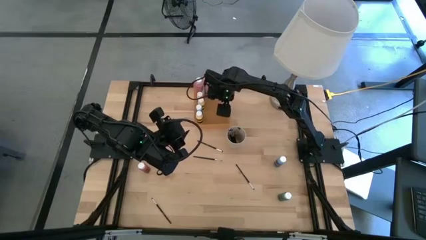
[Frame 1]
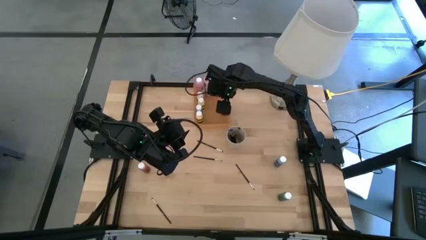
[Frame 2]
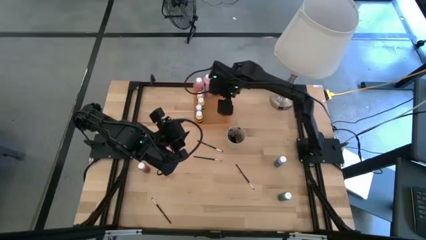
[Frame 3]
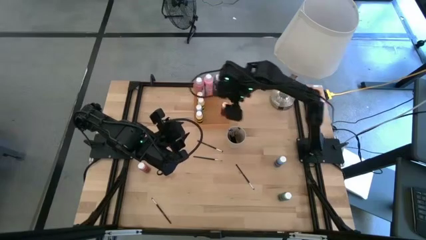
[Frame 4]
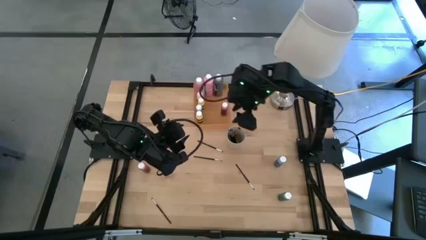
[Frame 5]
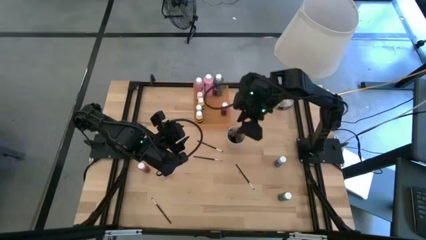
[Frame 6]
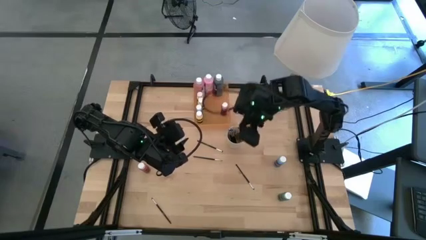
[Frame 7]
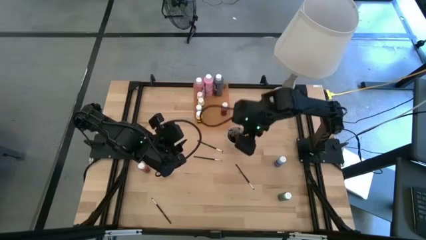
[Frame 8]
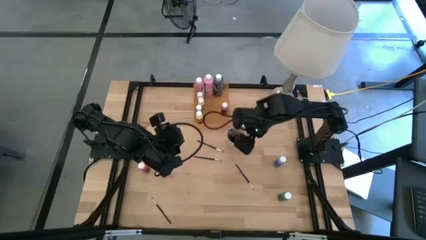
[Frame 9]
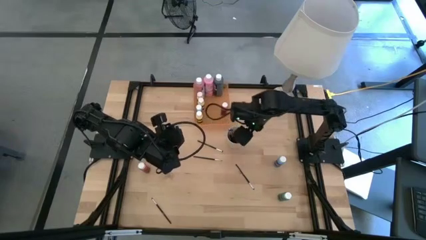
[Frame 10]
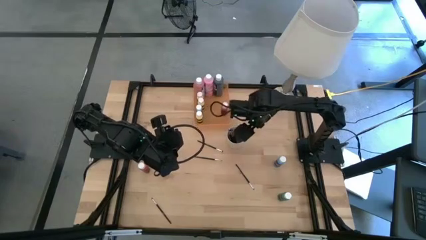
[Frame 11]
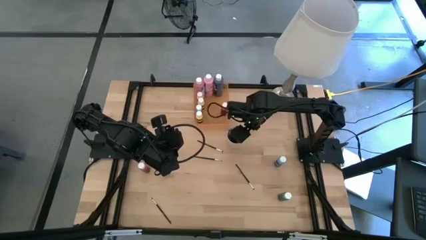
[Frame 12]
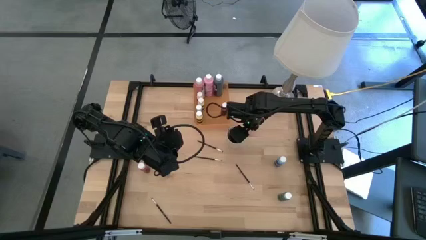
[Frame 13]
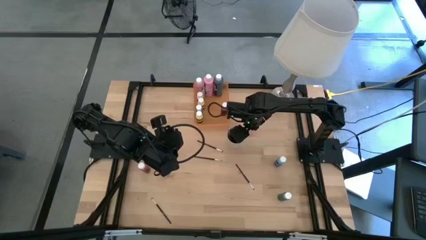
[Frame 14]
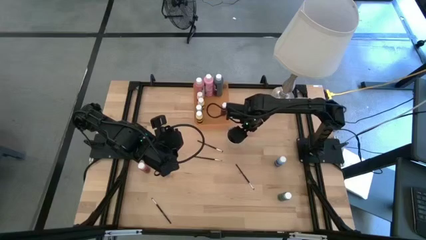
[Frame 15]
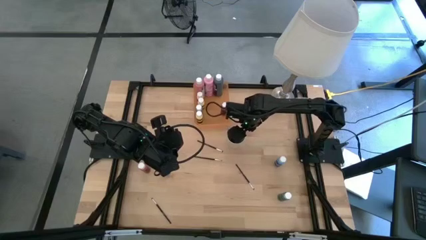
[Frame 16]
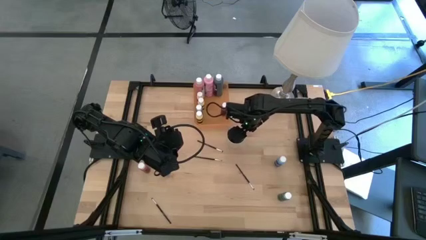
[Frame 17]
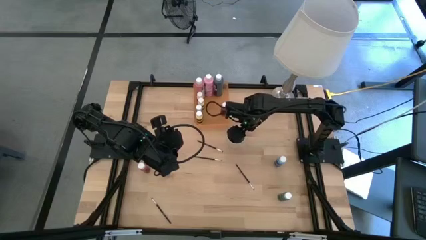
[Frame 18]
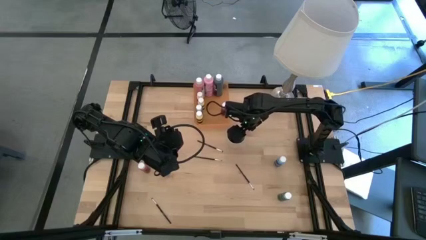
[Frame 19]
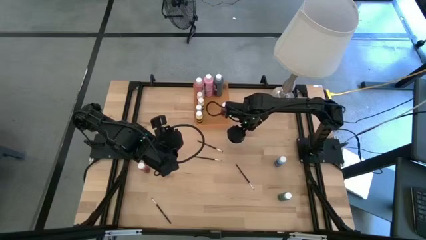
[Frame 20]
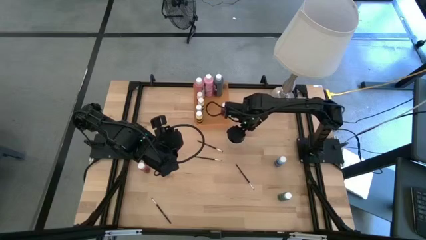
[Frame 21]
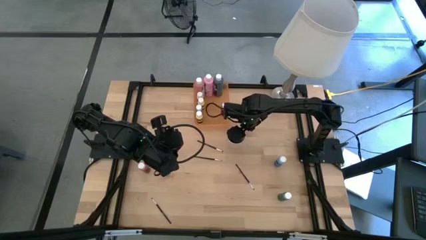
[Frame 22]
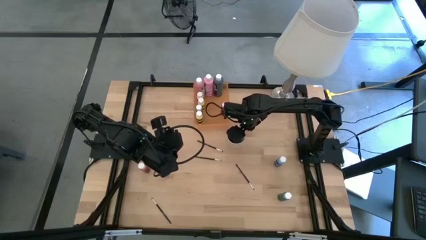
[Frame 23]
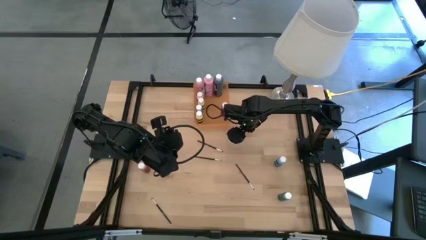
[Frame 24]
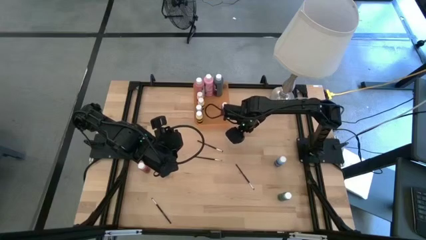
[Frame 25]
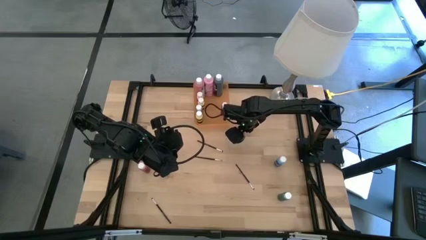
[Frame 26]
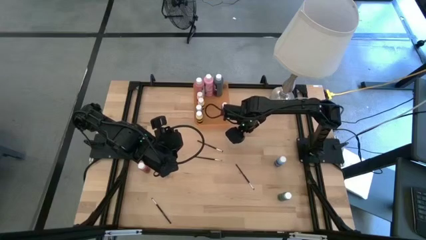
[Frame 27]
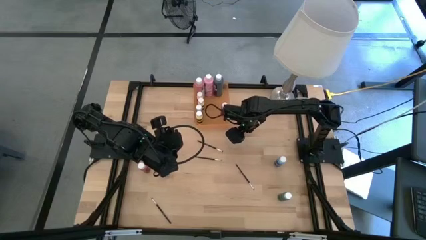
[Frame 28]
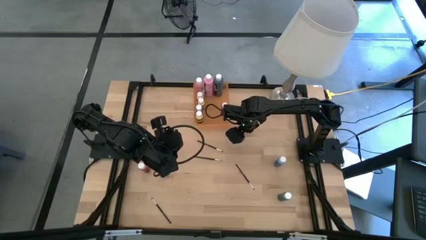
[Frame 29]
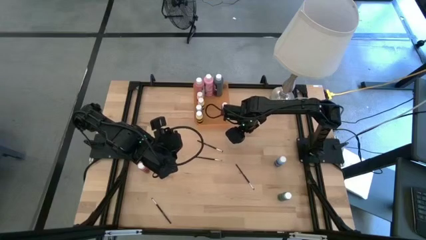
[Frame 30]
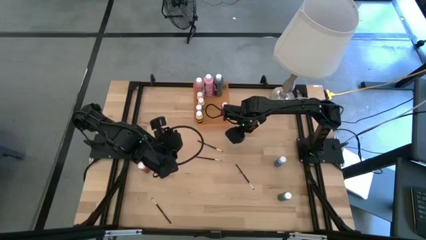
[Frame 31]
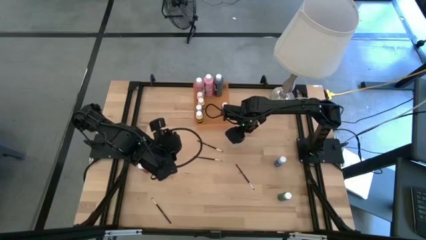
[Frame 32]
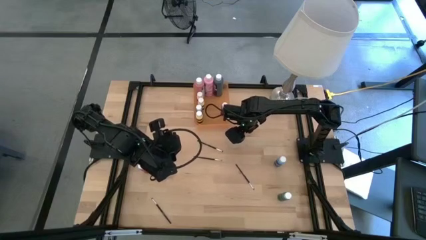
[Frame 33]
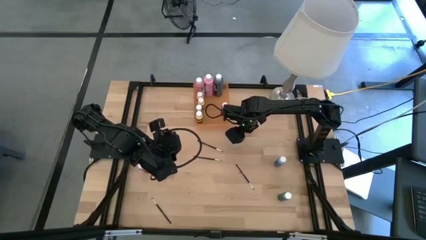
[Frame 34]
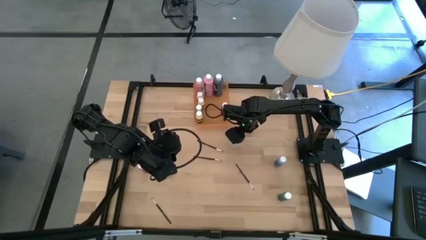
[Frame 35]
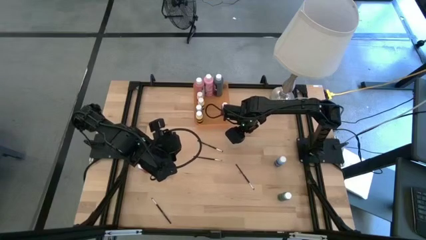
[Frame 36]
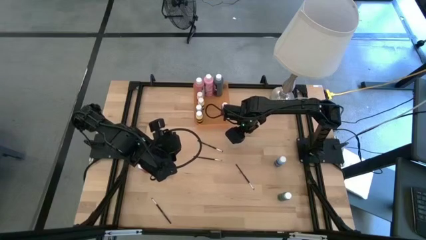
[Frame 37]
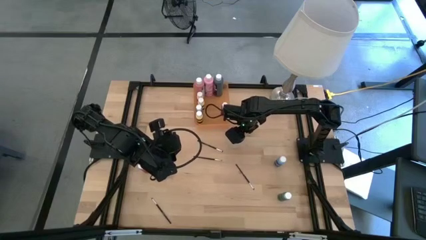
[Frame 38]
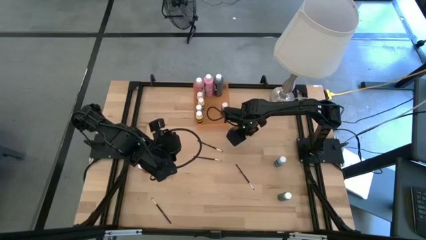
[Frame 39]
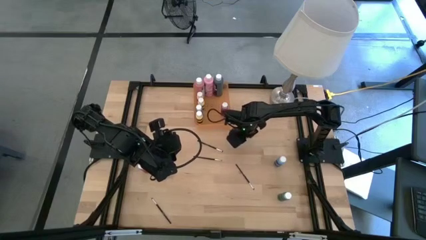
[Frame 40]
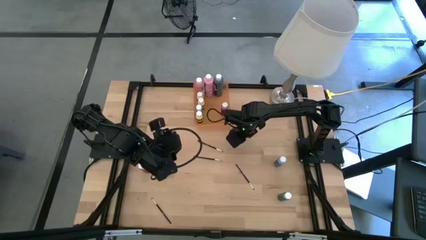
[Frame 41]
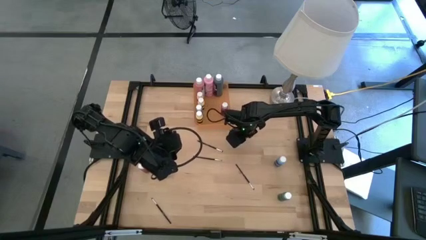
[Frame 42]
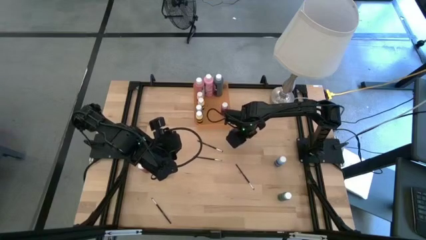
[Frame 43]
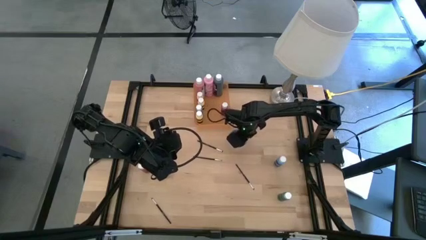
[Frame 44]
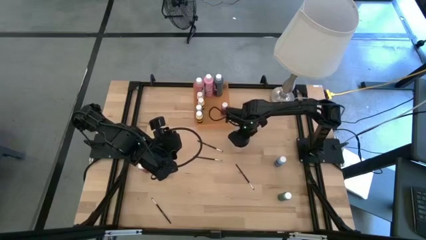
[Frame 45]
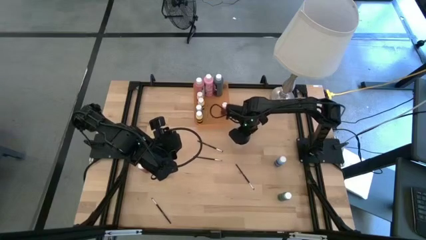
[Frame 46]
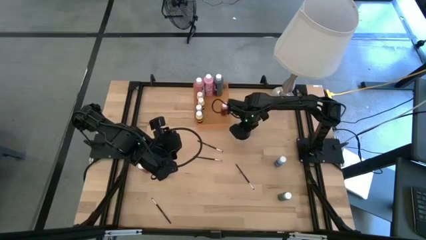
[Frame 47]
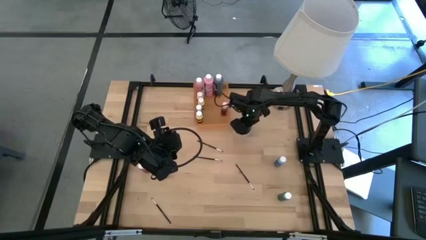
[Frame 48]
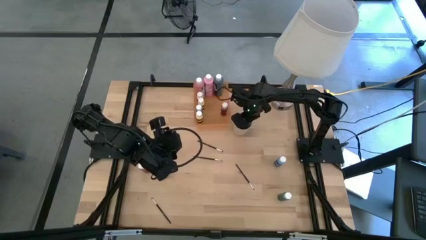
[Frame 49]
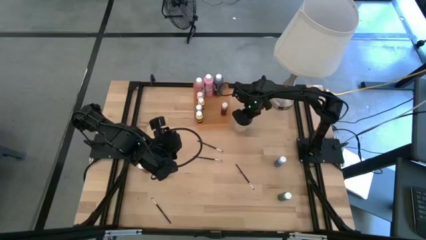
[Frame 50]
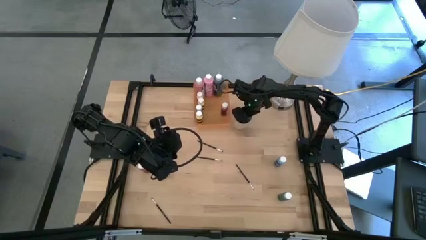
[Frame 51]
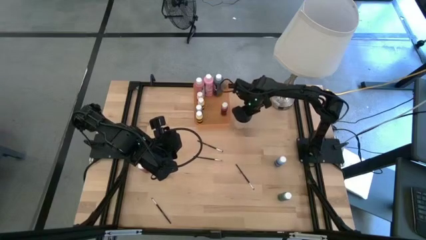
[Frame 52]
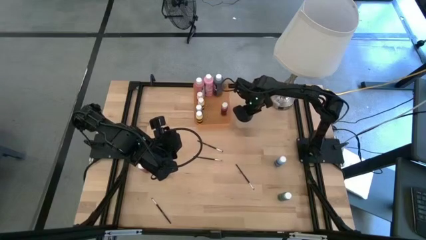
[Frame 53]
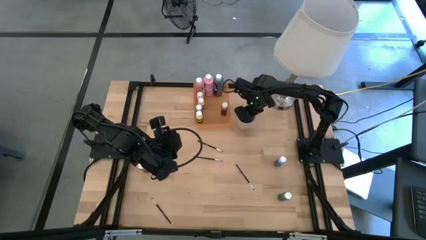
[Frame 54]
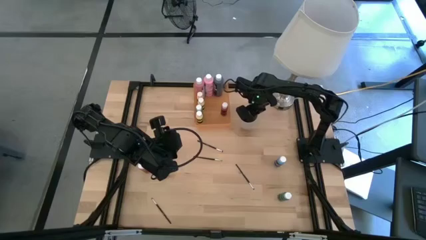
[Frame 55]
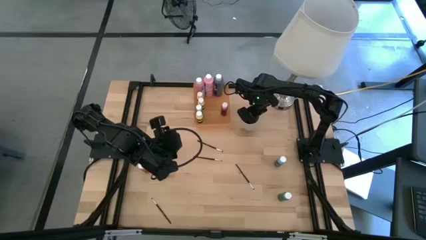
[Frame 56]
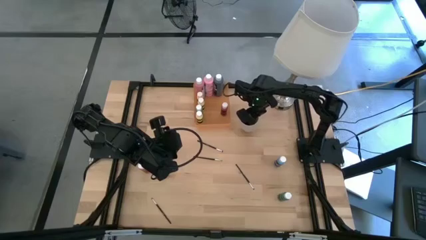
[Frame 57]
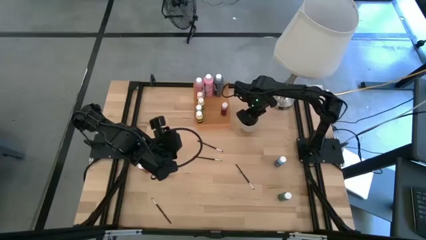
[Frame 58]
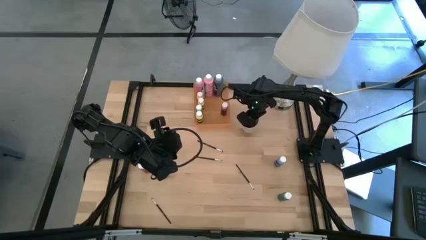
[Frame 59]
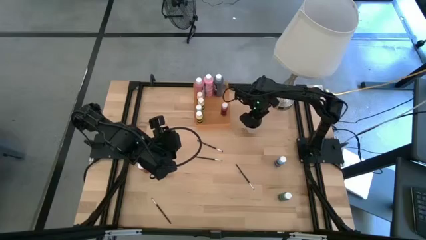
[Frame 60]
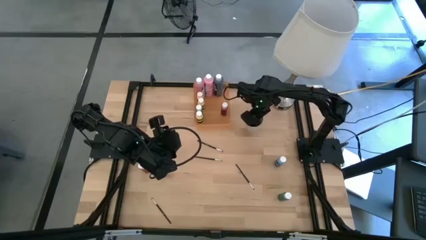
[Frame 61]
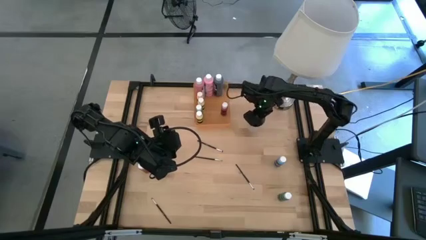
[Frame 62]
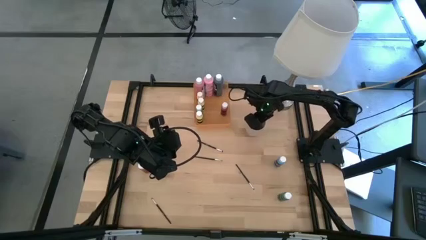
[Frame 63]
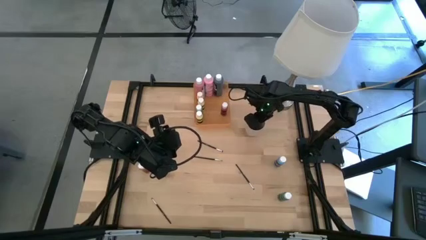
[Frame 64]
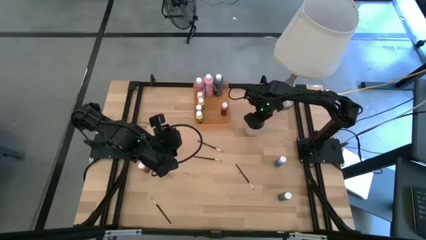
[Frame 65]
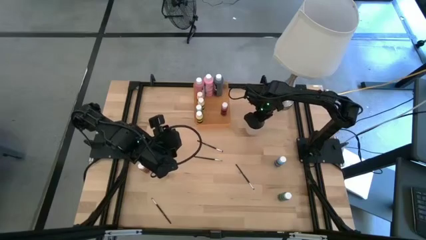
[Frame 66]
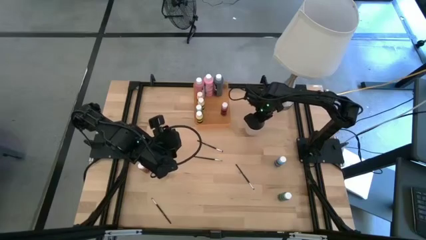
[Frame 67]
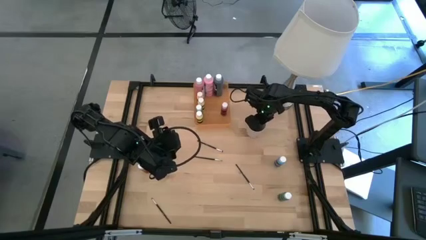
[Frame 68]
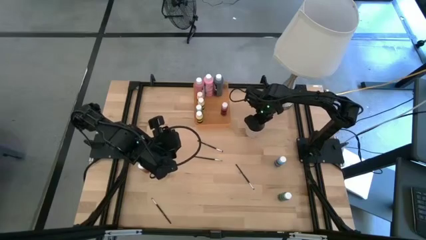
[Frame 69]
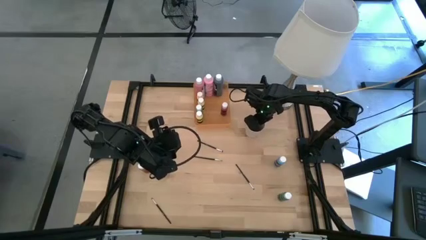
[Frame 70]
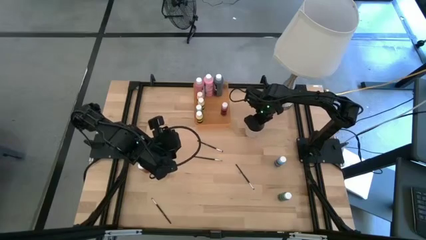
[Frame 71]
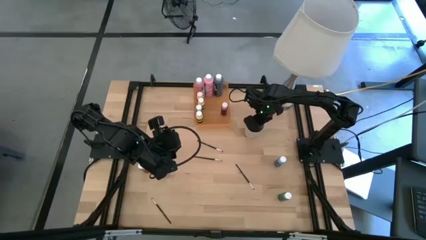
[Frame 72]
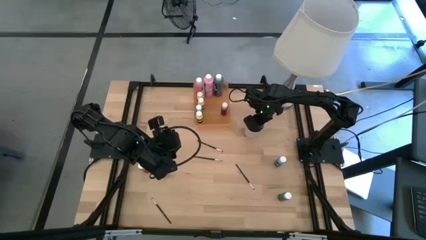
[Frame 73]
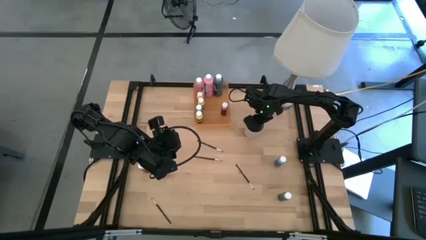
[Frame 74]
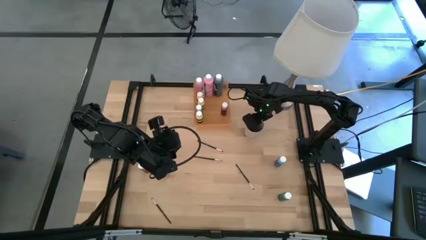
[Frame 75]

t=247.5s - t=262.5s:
Task: Pick & Place Paint Supplies
Adjust the light brown cup

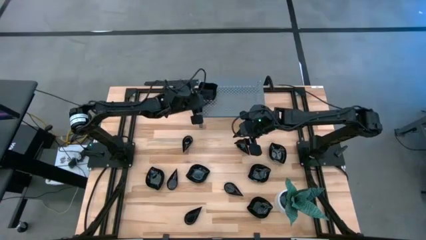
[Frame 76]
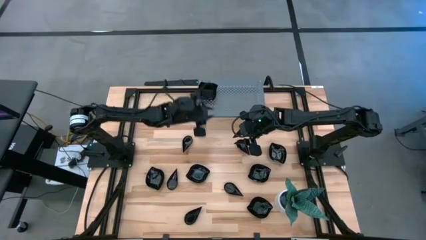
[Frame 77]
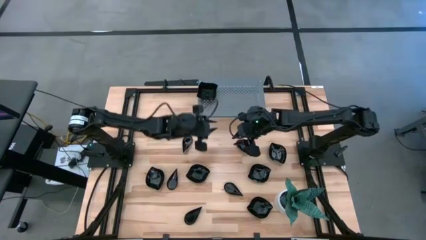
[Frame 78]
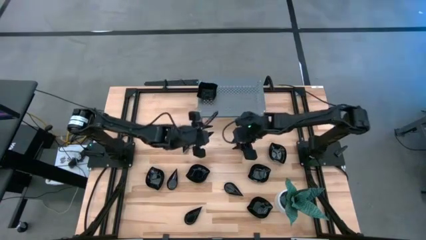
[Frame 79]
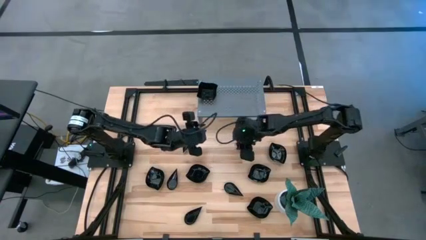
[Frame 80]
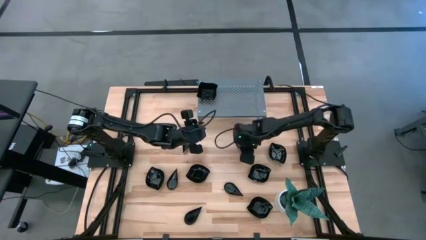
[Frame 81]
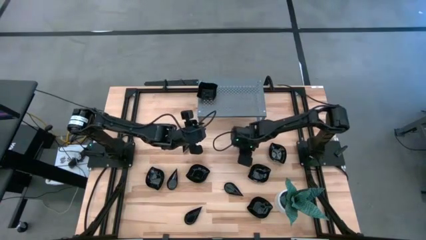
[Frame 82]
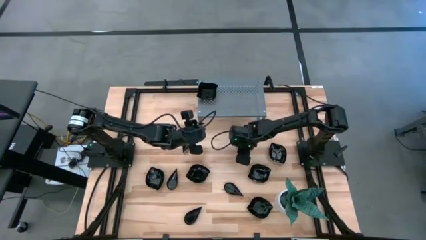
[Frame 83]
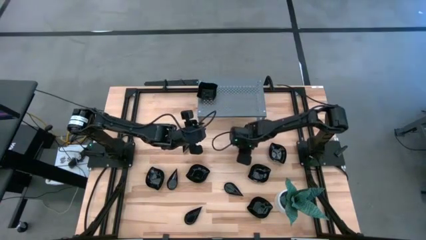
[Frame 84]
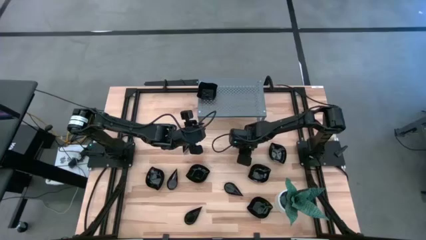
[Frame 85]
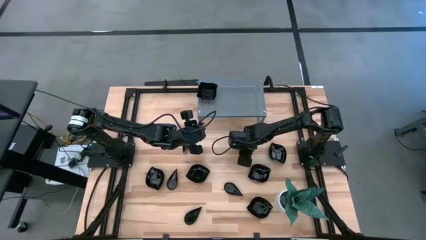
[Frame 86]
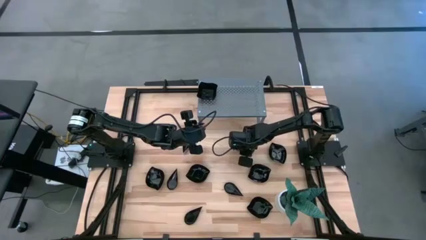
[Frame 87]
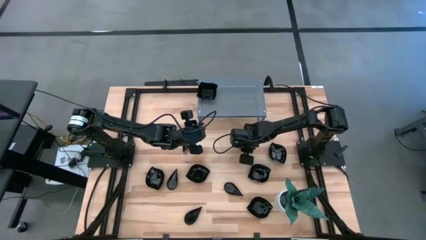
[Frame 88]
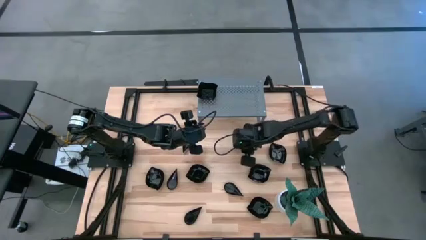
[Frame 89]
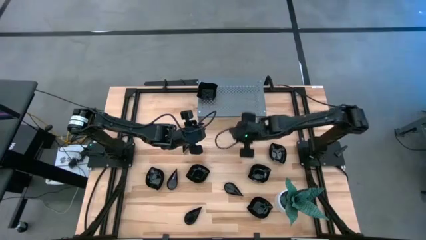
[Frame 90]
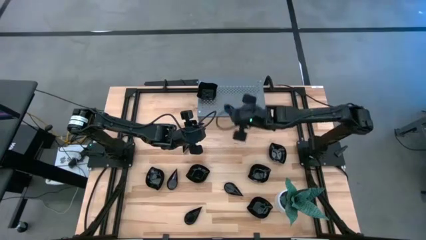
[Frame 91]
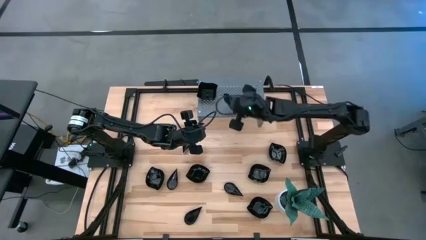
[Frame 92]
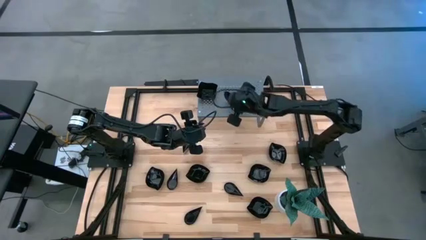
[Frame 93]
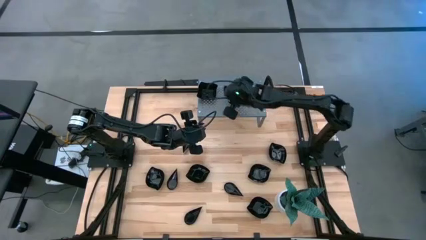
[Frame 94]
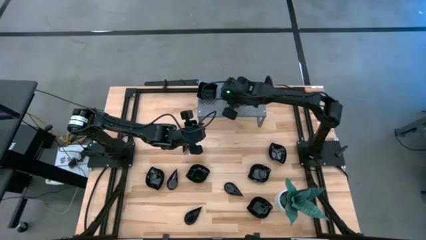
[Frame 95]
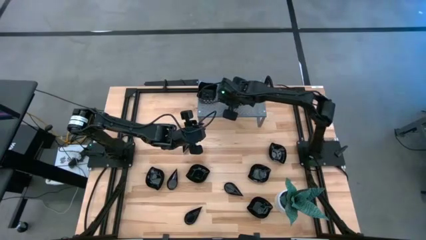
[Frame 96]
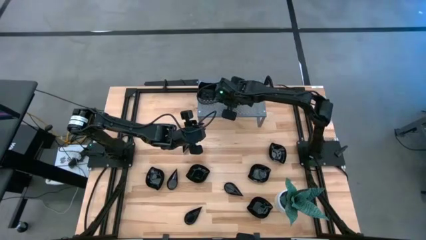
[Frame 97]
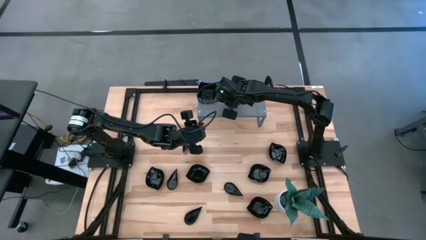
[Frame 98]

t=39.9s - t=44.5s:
Task: Pick & Place Mini shaped plates
Put the drop-shaped plate on the shelf
